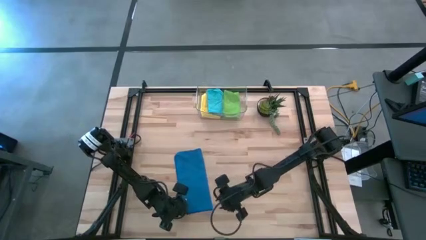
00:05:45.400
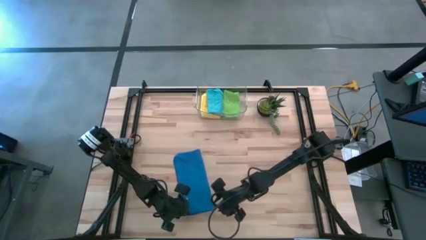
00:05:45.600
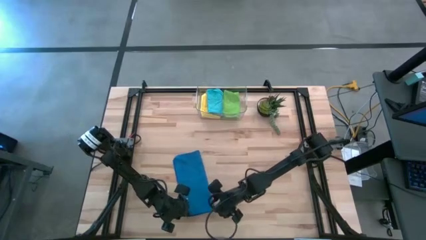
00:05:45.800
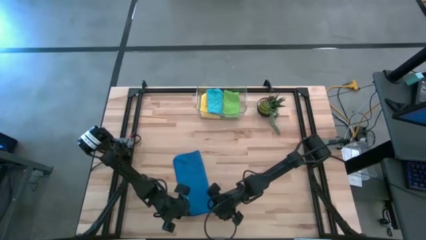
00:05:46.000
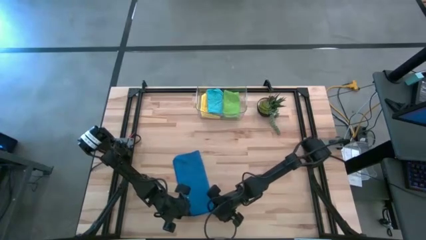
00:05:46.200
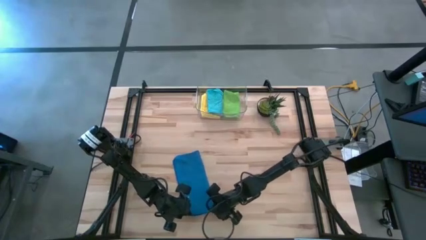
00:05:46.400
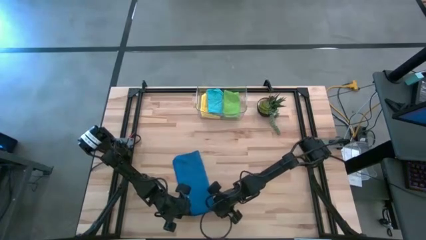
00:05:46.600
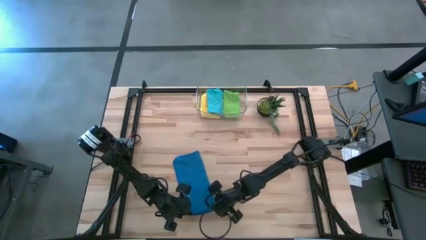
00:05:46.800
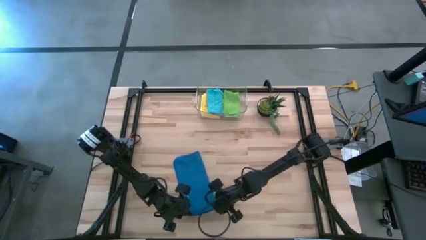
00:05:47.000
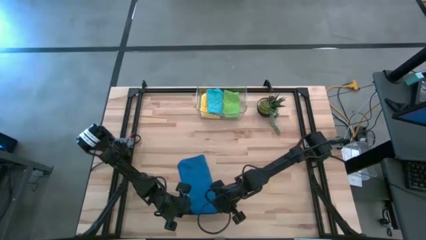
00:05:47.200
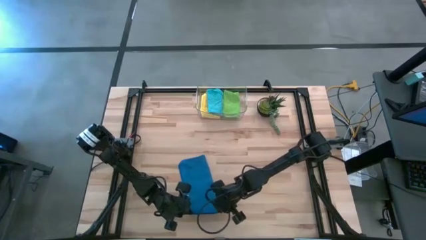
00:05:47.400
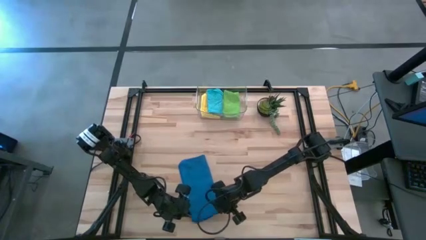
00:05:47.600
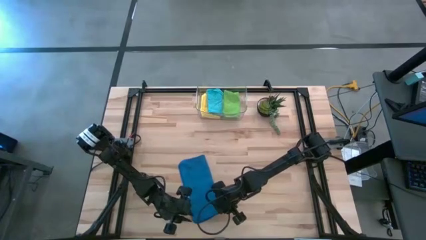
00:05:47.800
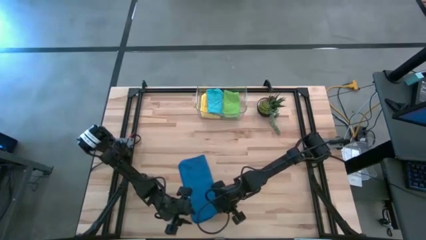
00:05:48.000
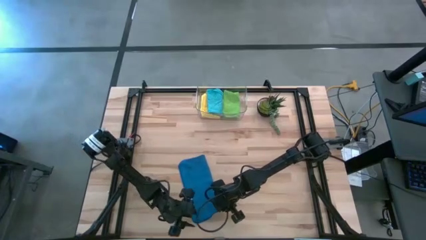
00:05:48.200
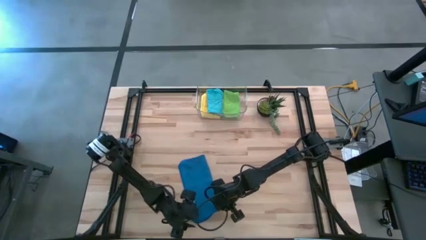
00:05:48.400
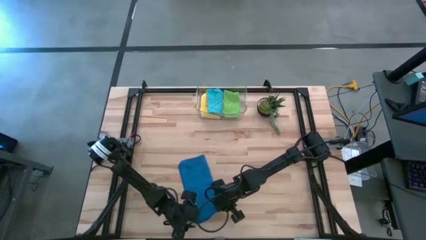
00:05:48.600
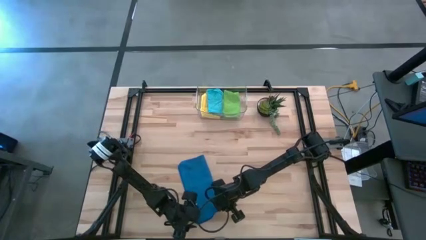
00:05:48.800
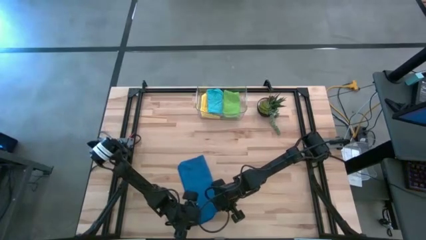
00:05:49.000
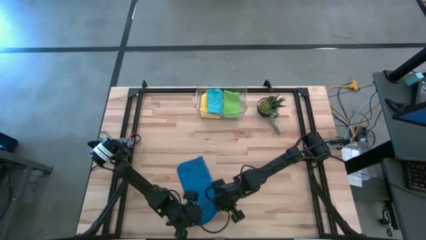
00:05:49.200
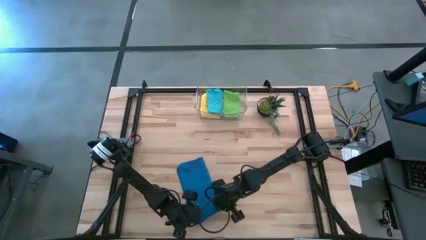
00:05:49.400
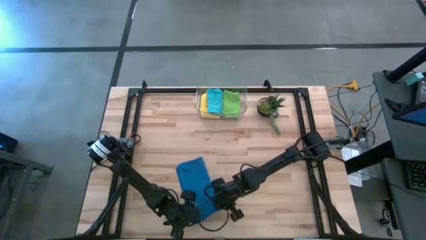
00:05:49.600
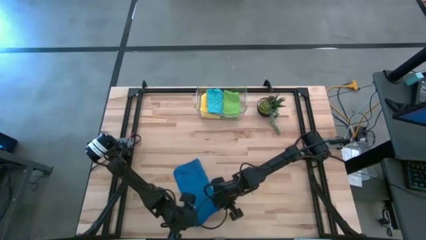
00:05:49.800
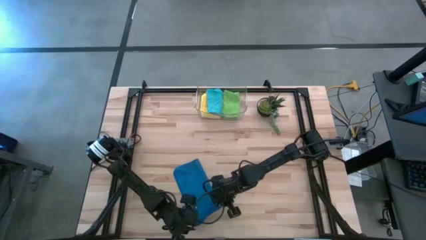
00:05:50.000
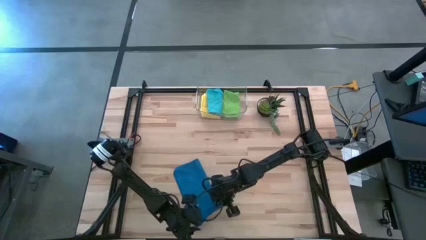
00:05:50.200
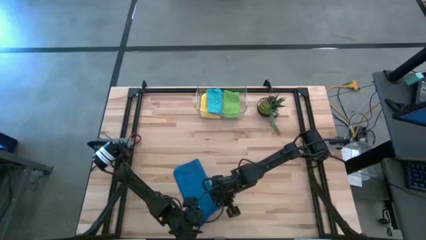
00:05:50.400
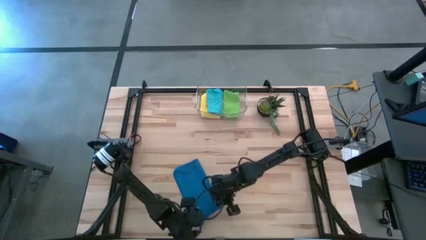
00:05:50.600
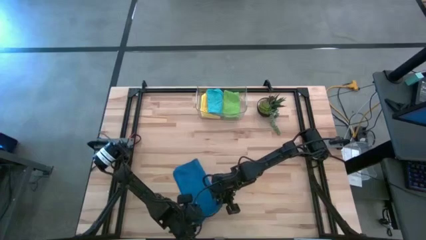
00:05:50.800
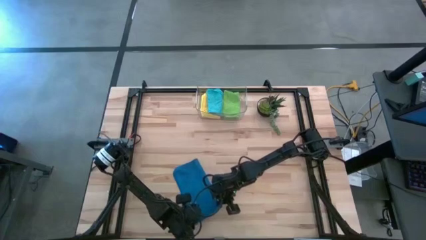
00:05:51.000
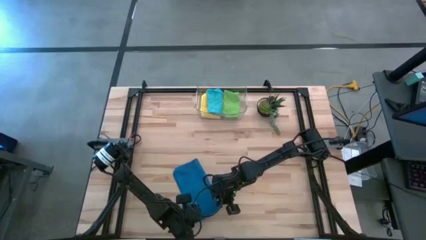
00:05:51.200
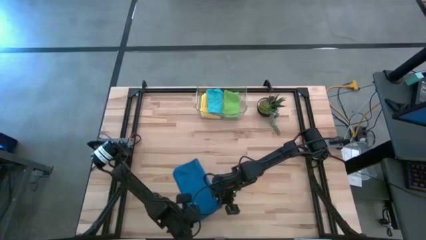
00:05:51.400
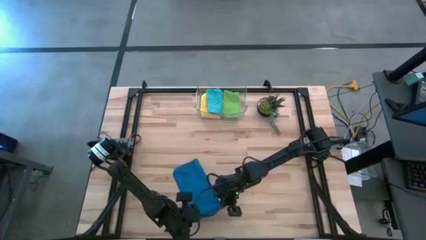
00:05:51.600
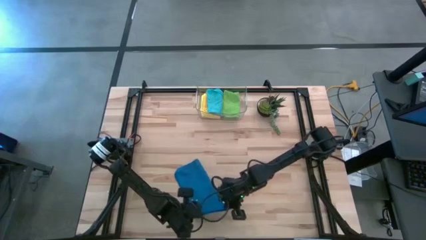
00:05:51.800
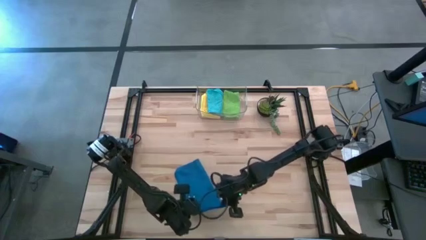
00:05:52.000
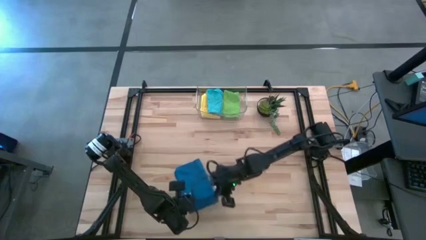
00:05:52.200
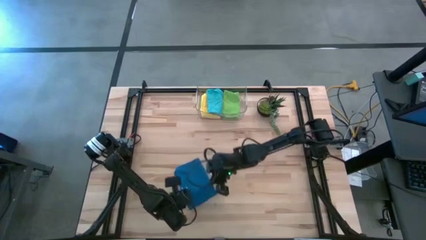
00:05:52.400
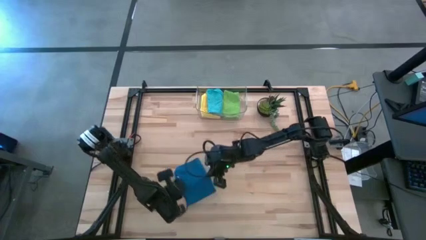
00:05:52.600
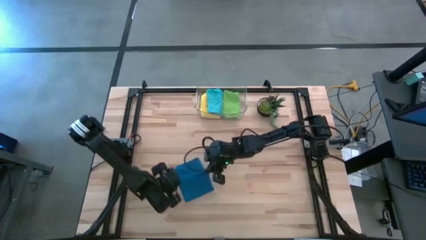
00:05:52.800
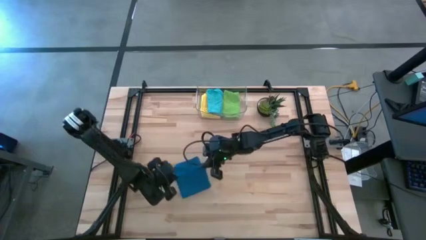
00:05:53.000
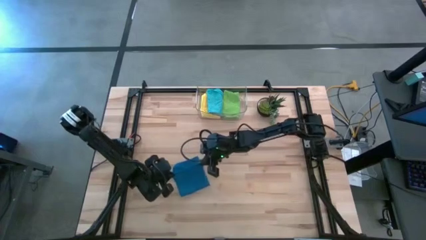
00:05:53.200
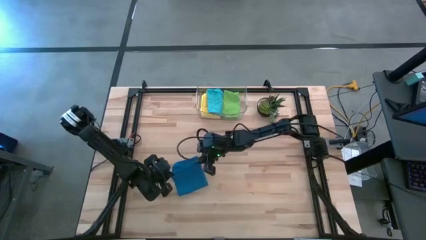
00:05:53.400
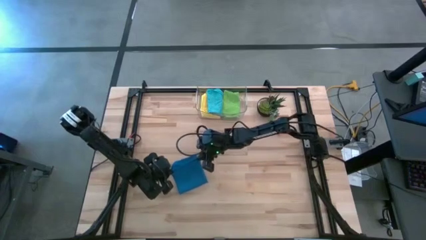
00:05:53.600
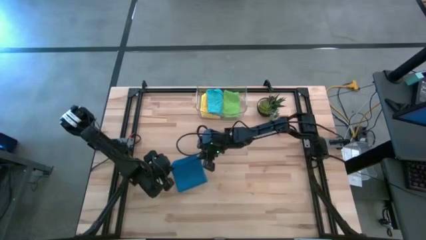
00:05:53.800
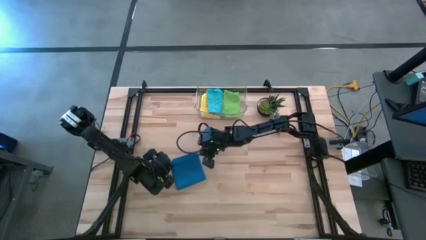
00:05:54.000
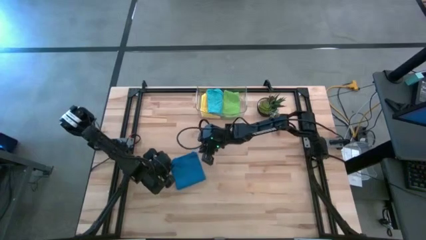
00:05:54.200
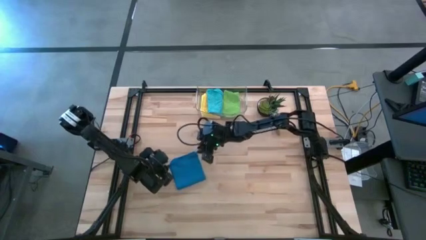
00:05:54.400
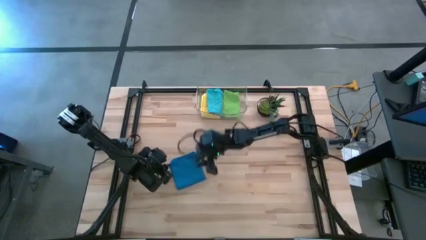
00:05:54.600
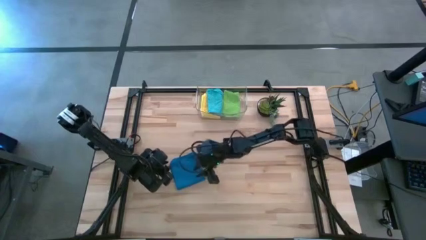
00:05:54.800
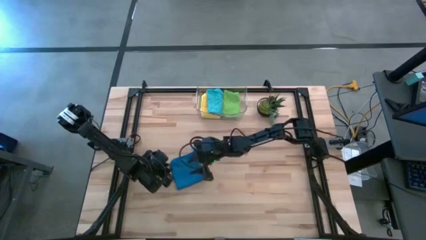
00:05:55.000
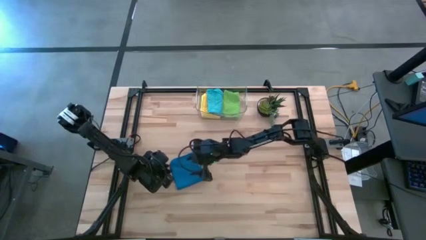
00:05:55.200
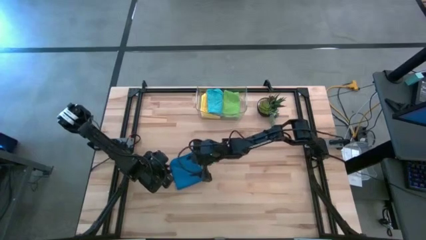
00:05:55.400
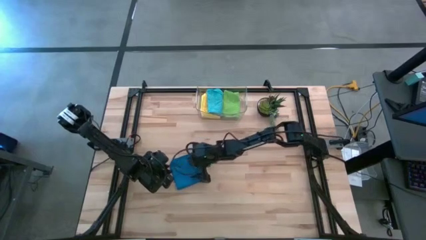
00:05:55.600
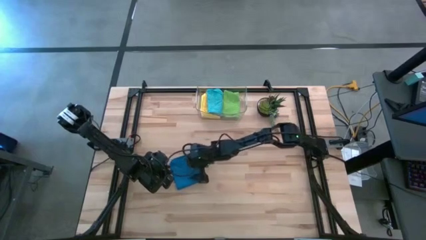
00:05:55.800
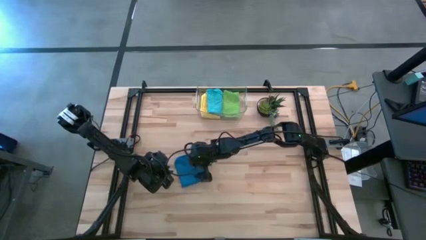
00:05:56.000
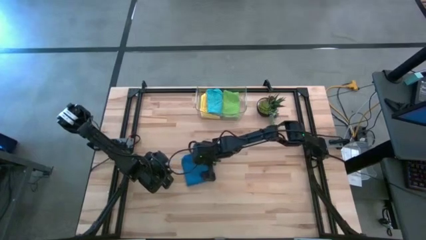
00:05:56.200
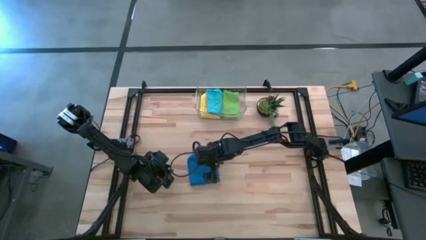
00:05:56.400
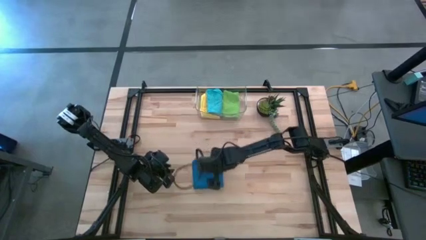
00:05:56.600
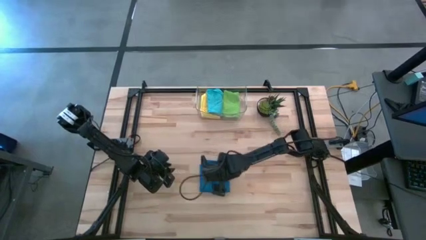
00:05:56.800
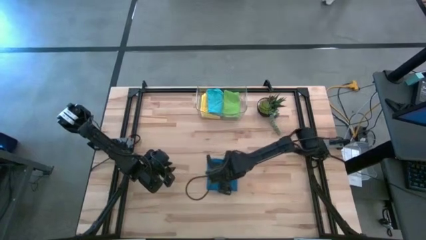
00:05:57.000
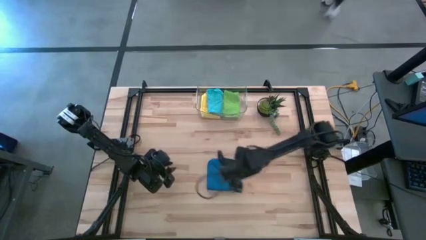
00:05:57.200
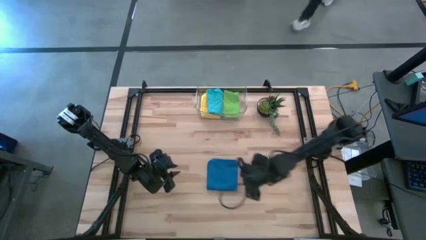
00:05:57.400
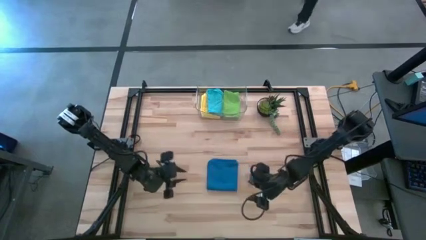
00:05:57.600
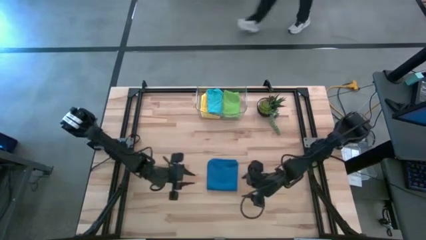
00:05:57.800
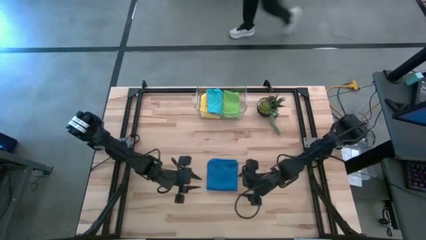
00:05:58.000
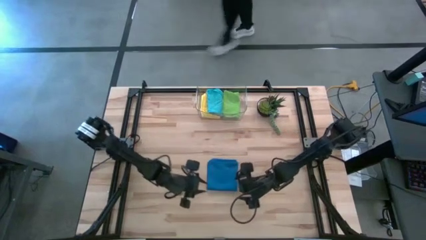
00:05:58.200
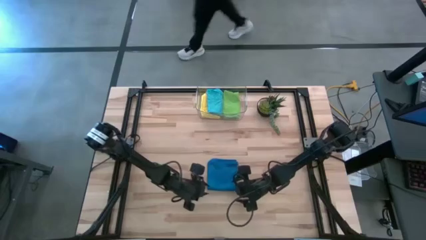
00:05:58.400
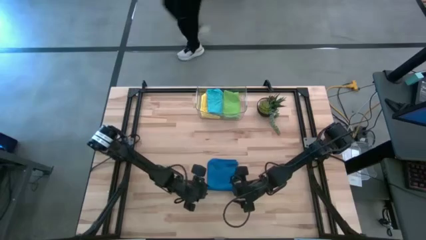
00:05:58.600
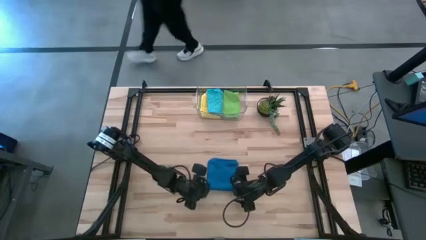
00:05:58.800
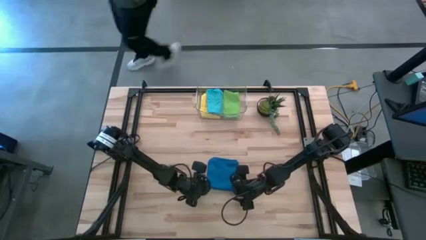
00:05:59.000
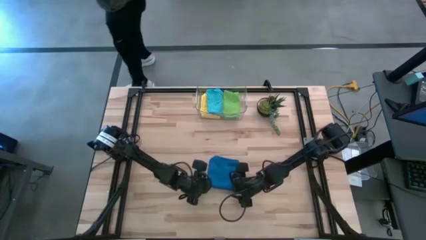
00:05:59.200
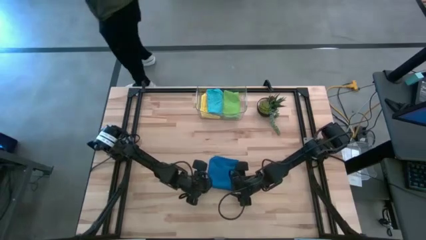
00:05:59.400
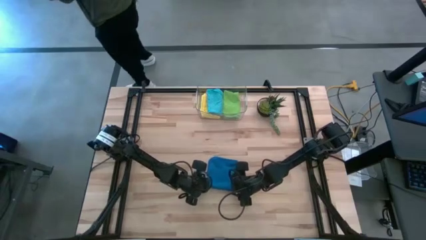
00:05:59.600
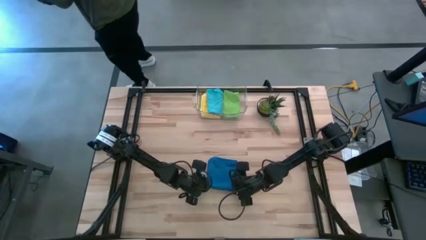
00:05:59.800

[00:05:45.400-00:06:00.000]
Task: Fold microfiber towels
Fold the dark blue microfiber towel

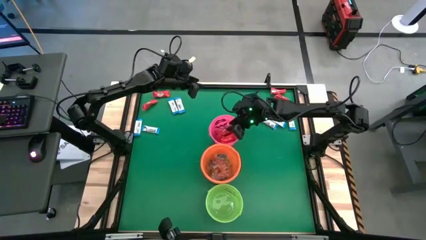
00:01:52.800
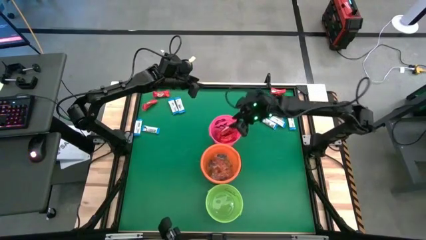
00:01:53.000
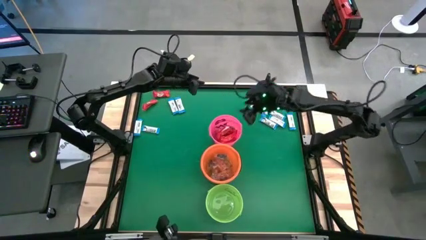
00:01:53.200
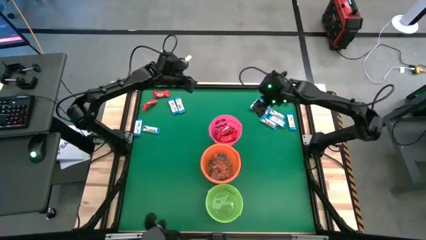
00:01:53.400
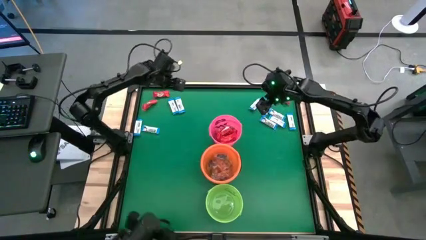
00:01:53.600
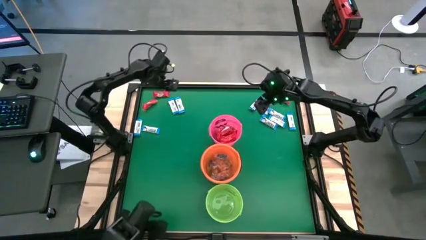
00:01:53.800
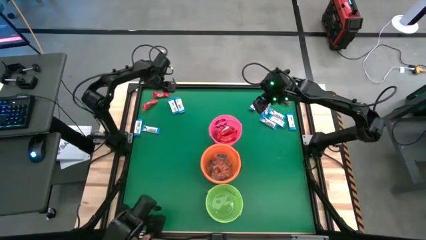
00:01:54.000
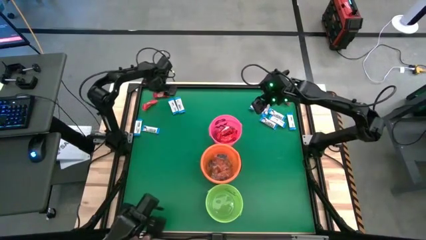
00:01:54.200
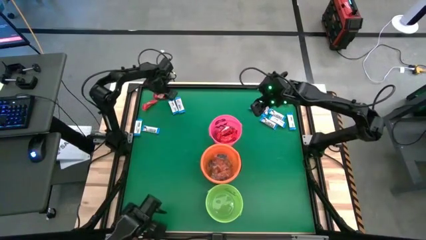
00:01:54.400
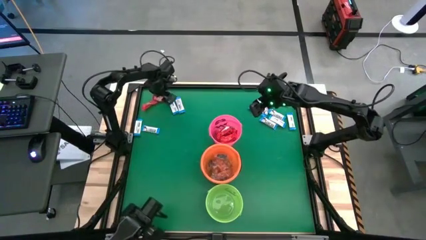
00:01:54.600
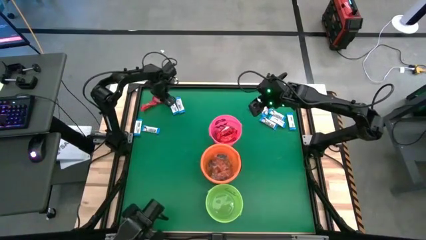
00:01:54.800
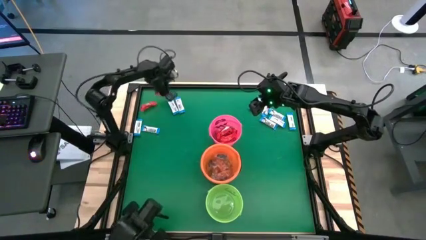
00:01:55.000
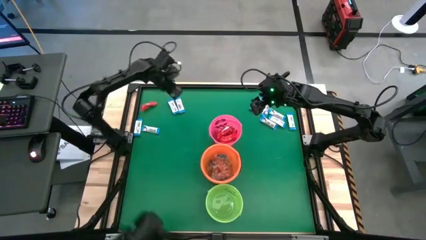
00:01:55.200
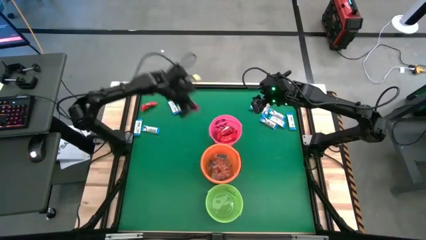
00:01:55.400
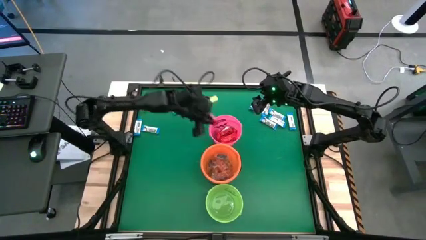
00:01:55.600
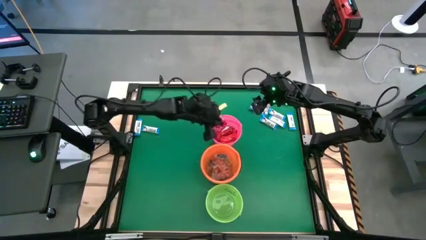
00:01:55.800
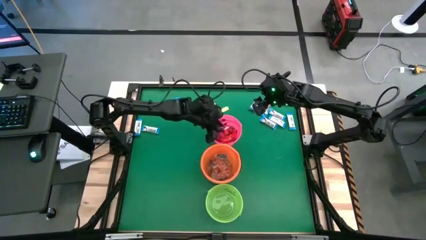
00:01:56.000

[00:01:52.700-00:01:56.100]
Task: Sort candy by brand, put in halloween buckets
Put the red chocolate into the pink bucket
